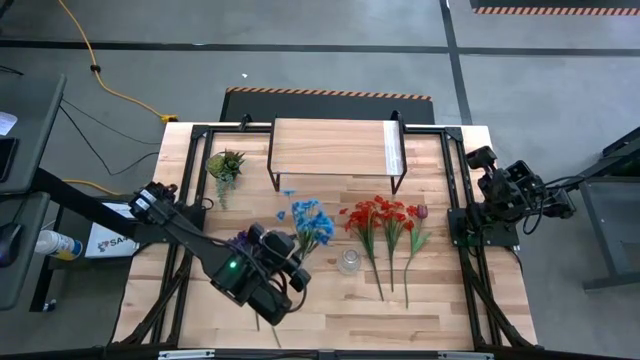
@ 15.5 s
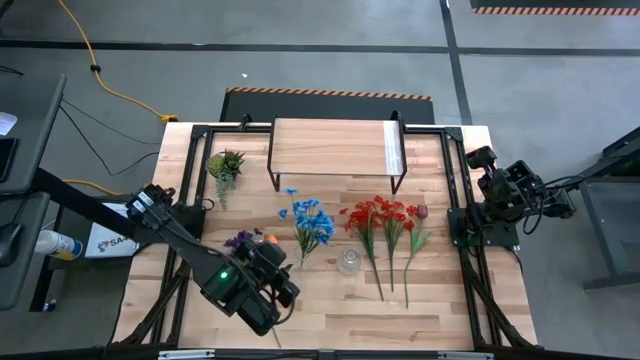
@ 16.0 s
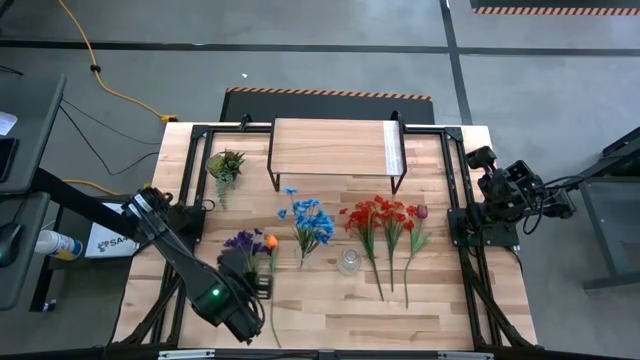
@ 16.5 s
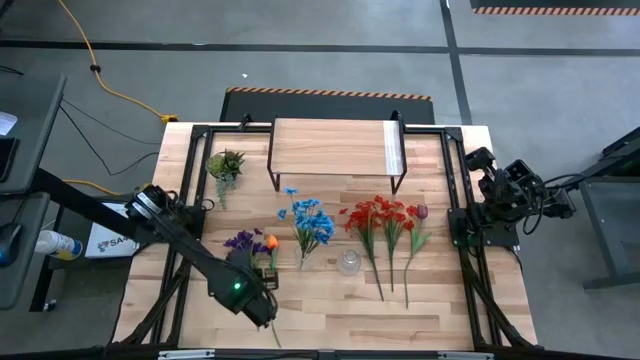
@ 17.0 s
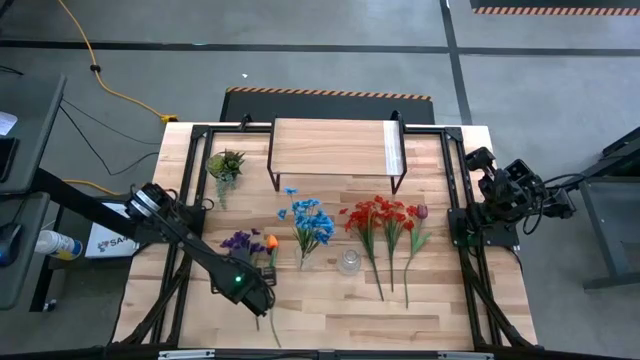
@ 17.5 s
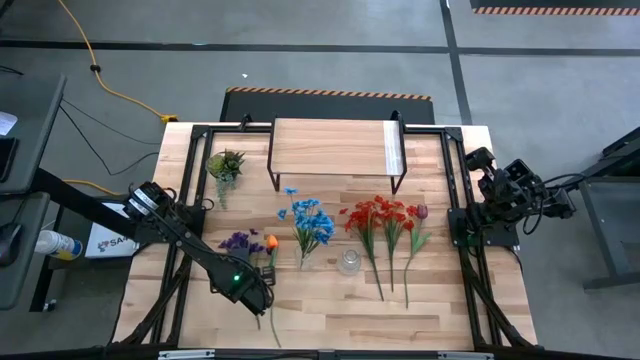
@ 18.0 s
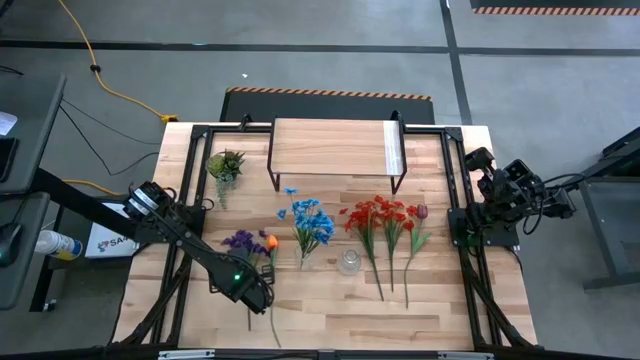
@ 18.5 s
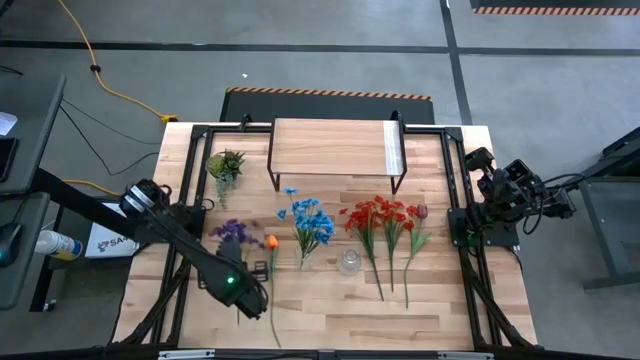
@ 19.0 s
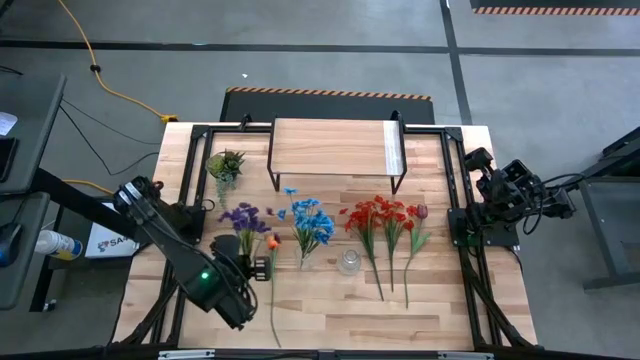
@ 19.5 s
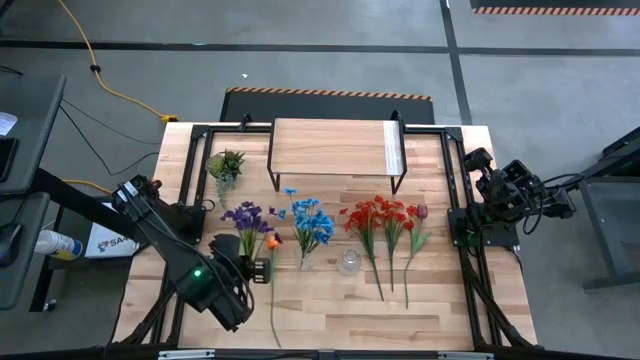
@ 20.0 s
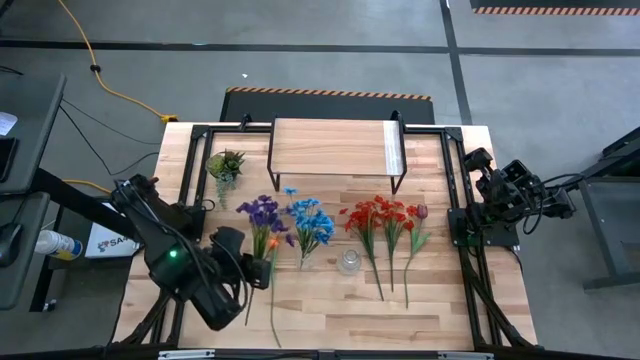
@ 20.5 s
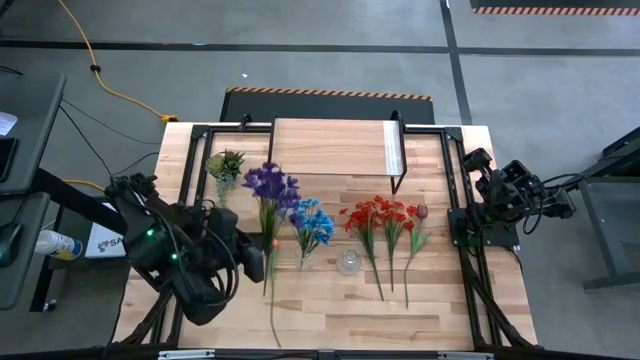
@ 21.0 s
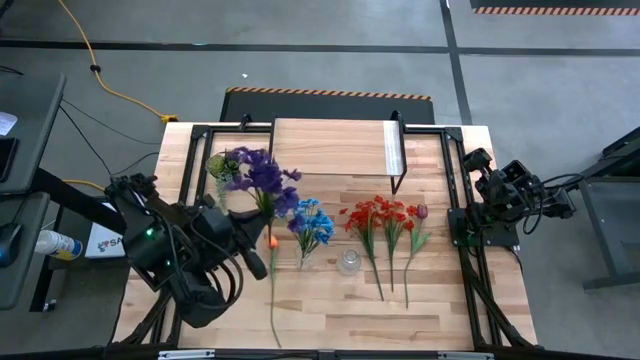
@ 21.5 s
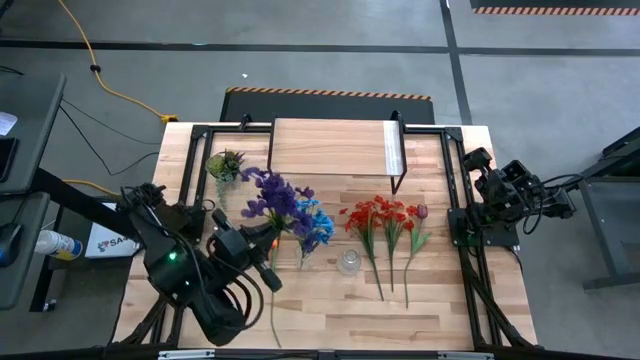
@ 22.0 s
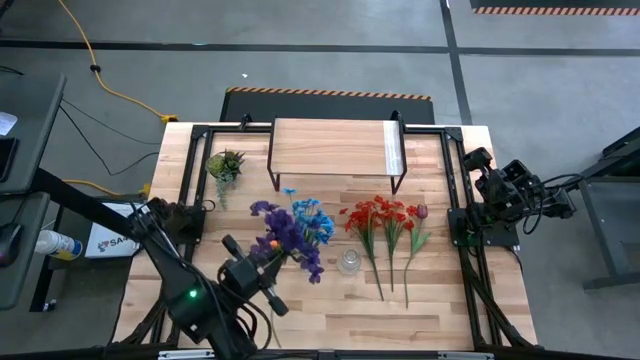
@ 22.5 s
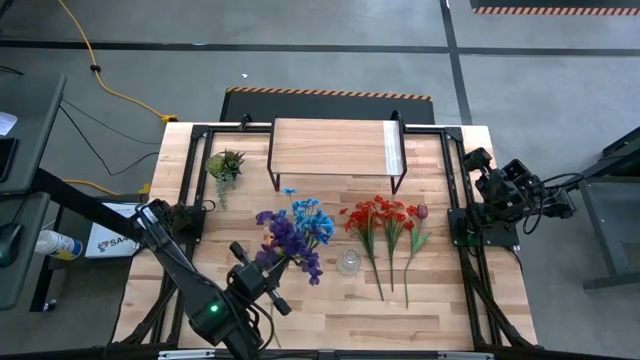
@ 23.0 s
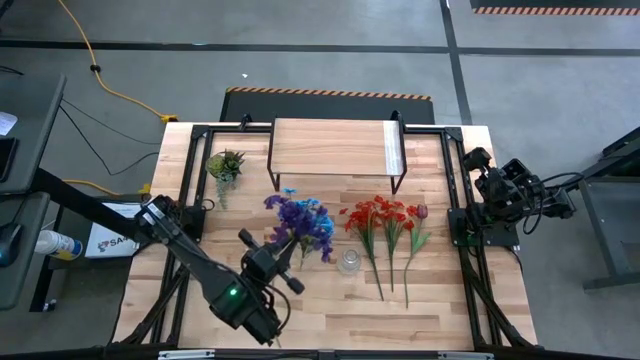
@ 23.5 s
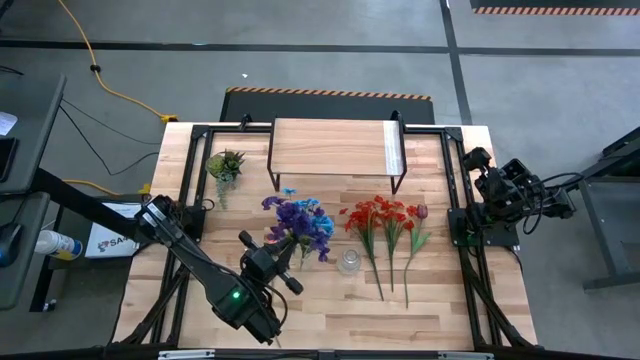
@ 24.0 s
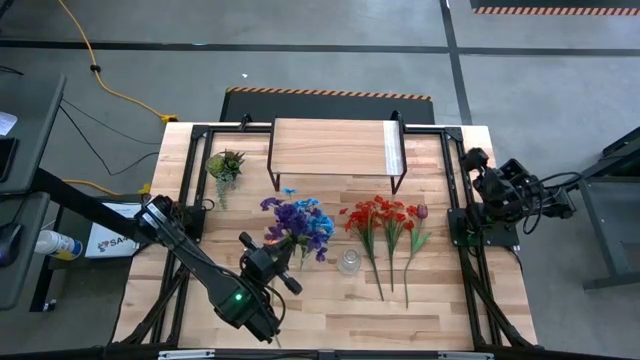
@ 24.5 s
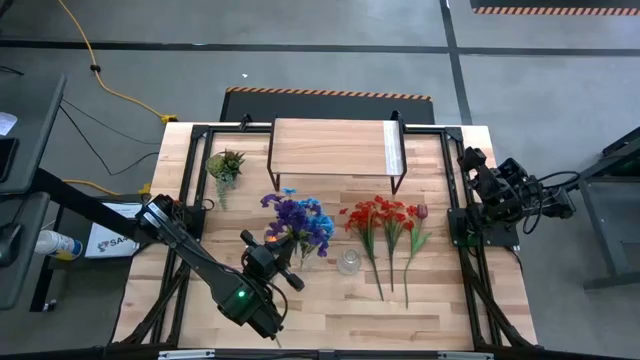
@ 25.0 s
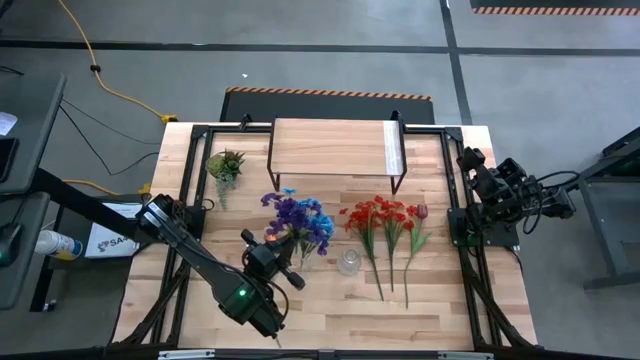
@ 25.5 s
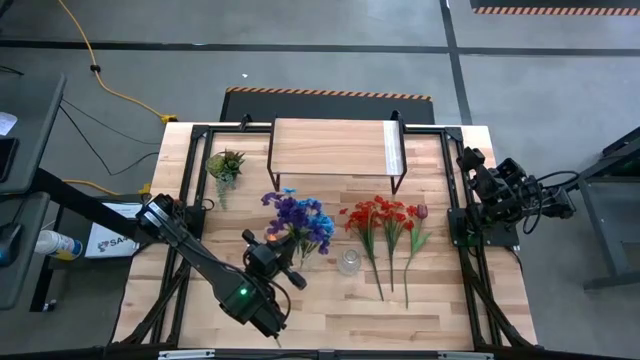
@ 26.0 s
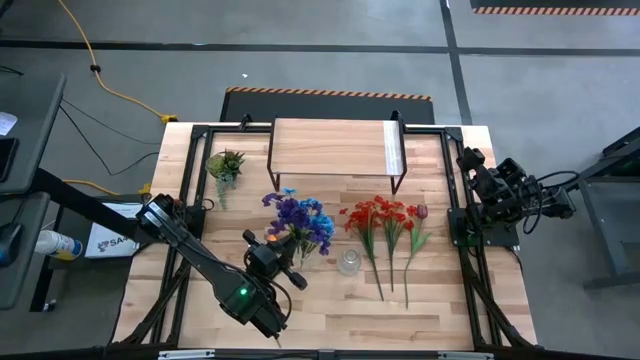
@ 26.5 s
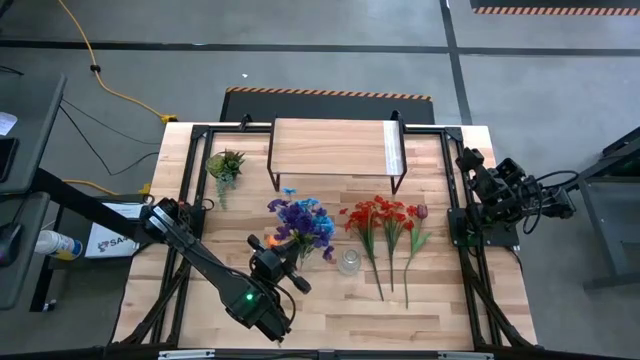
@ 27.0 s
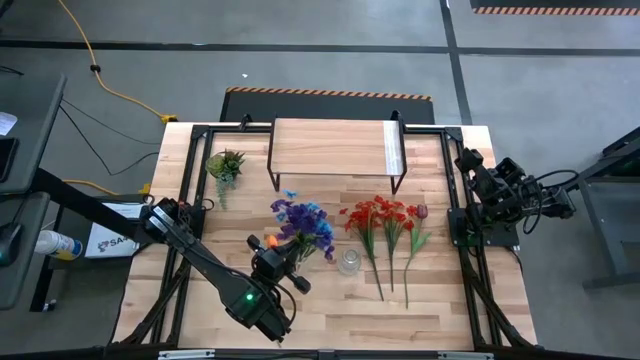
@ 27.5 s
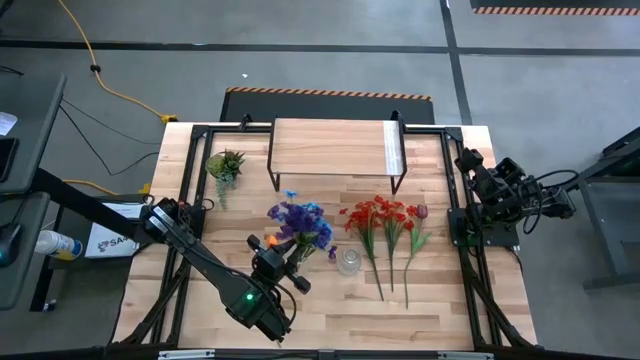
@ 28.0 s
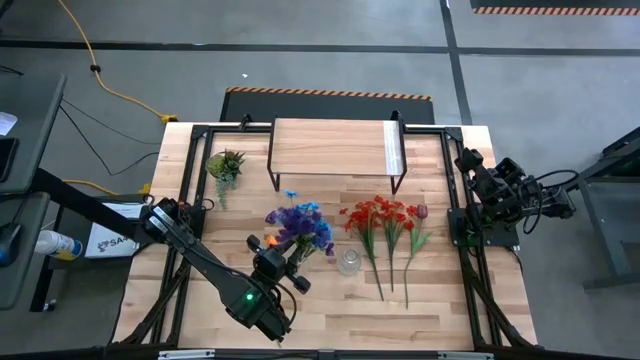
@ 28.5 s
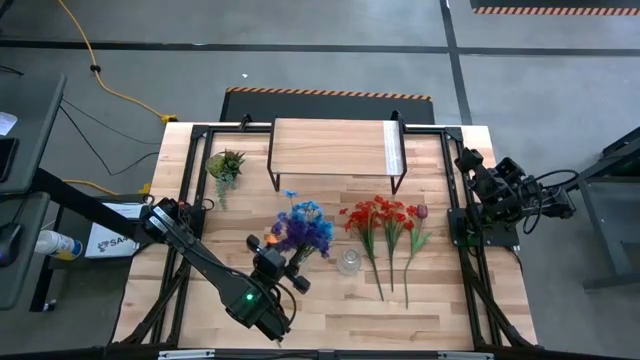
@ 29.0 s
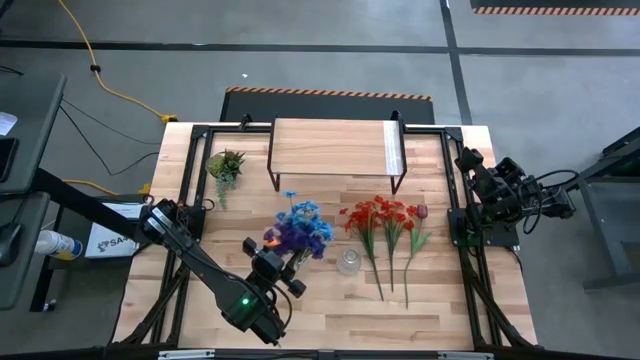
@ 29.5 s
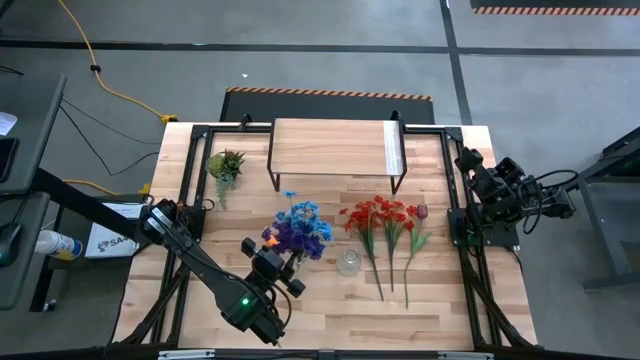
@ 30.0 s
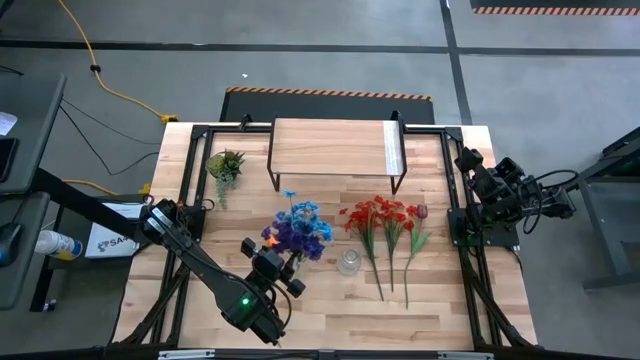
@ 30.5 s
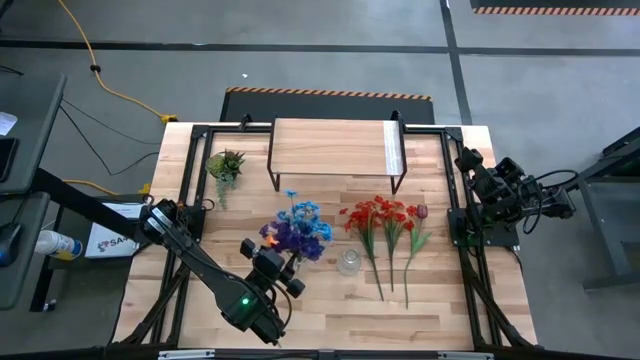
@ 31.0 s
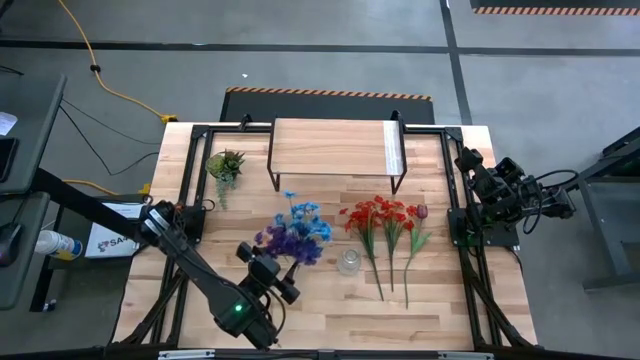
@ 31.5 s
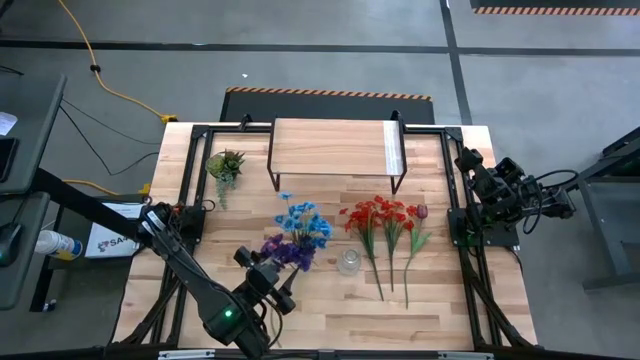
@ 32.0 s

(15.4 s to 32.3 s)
Task: Pick and place flowers into a vace then onto a shelf
Put the purple flowers into the left transparent flower vase
